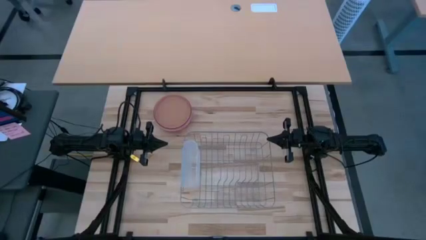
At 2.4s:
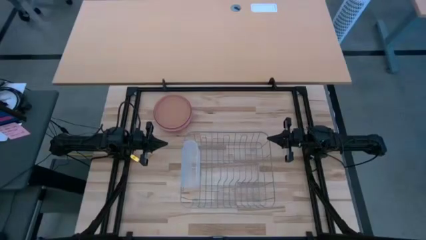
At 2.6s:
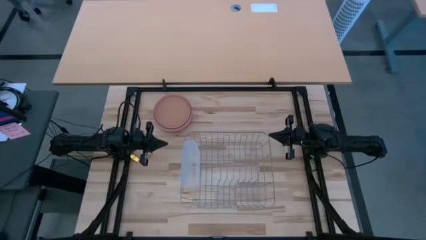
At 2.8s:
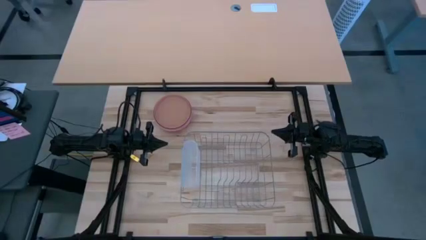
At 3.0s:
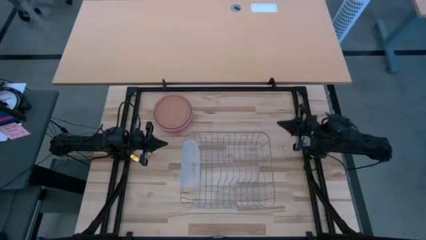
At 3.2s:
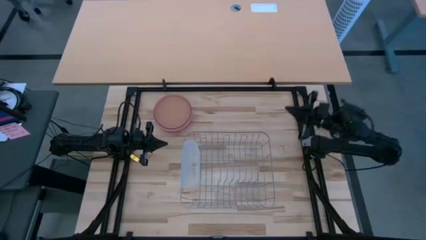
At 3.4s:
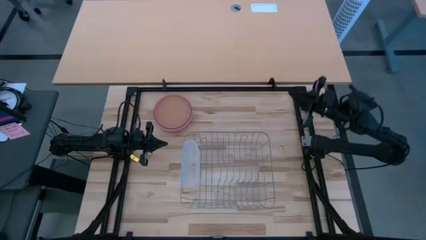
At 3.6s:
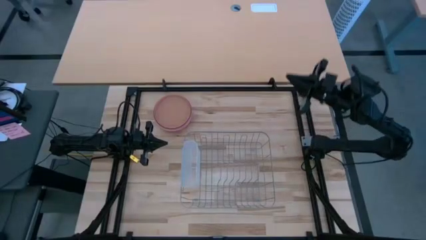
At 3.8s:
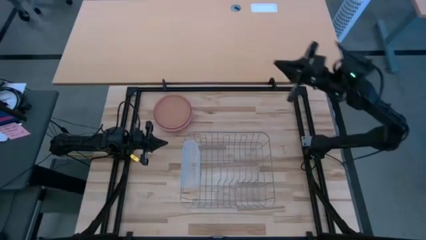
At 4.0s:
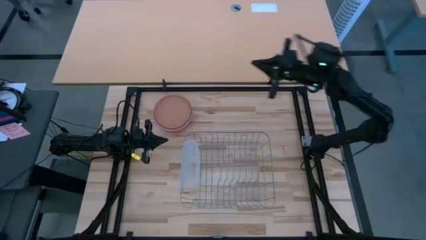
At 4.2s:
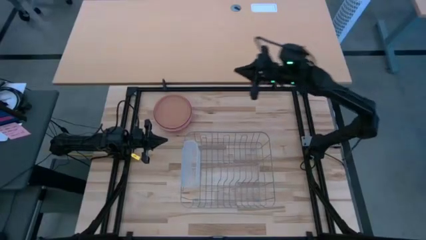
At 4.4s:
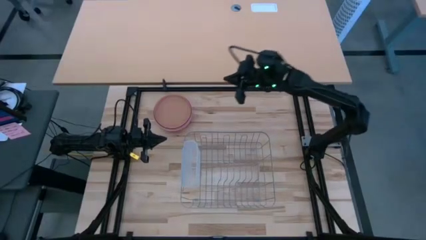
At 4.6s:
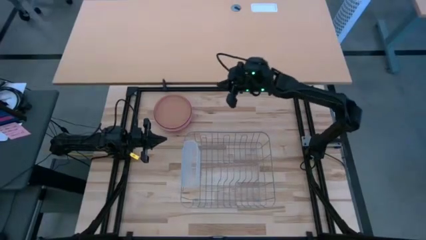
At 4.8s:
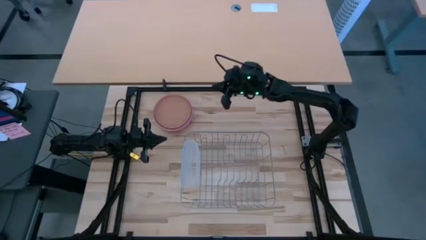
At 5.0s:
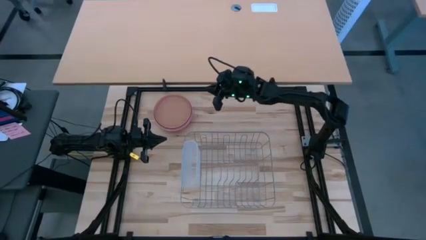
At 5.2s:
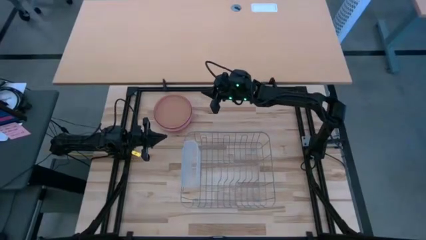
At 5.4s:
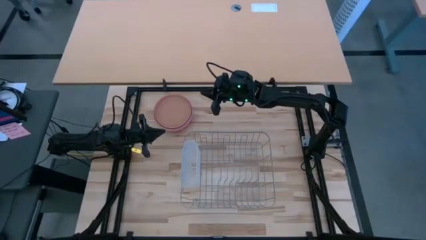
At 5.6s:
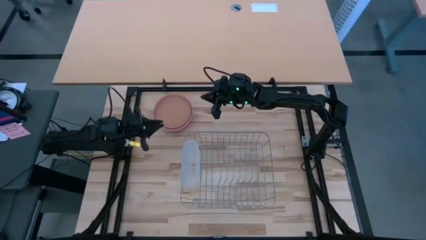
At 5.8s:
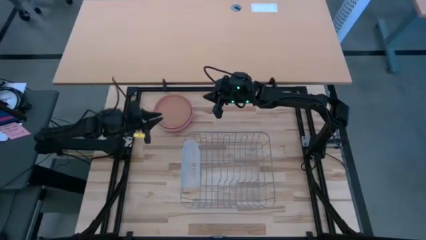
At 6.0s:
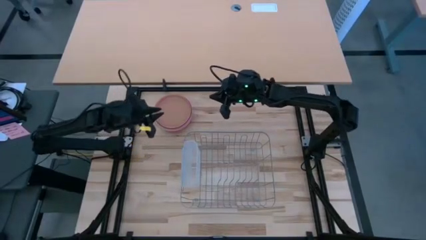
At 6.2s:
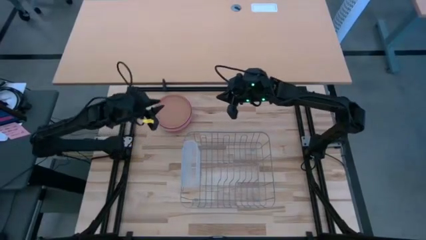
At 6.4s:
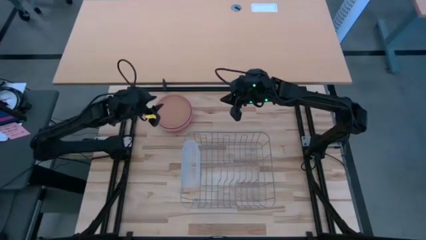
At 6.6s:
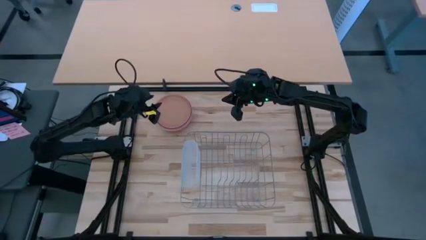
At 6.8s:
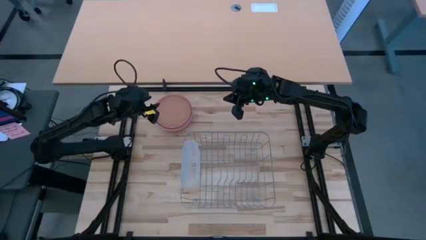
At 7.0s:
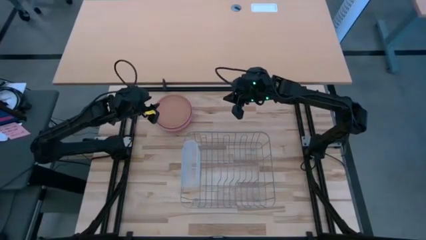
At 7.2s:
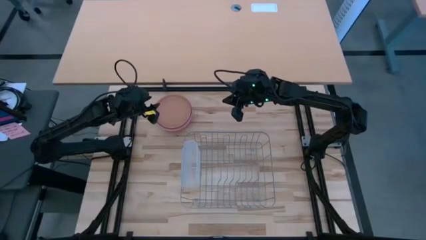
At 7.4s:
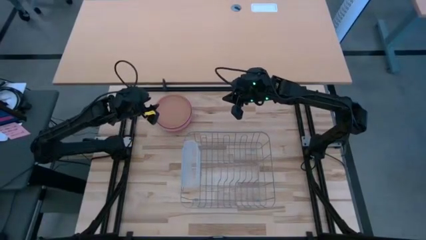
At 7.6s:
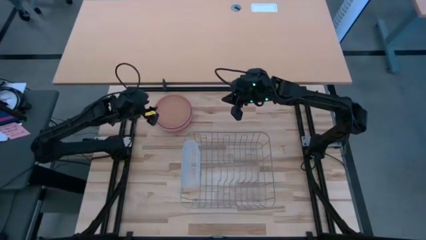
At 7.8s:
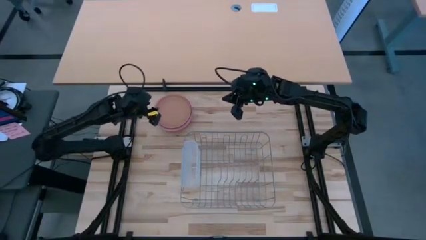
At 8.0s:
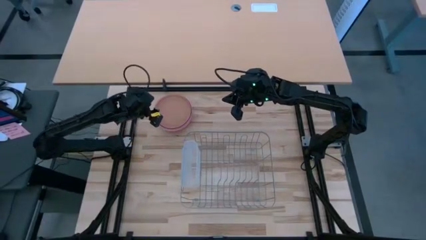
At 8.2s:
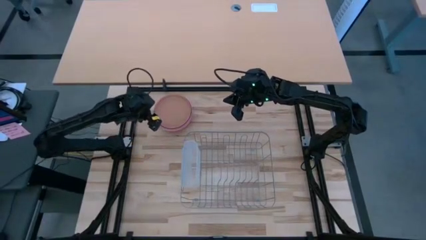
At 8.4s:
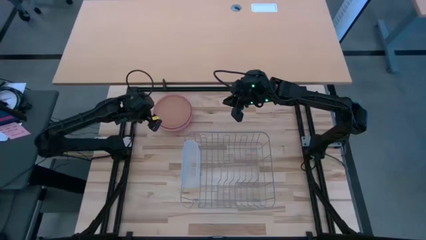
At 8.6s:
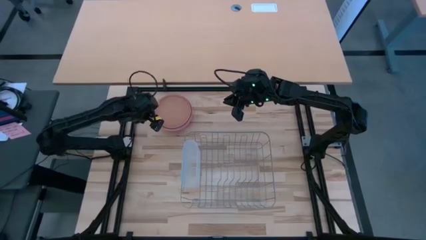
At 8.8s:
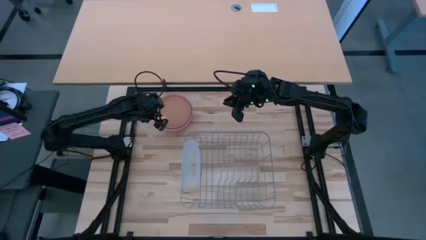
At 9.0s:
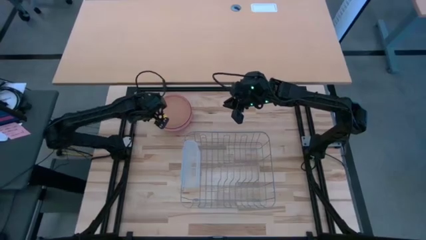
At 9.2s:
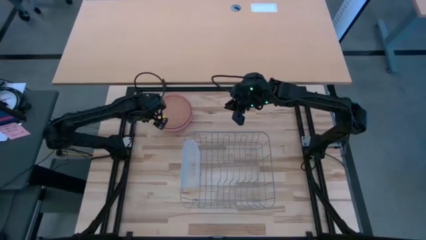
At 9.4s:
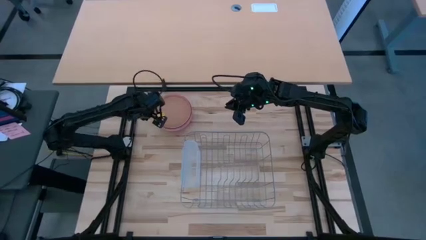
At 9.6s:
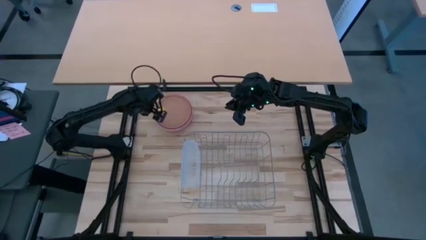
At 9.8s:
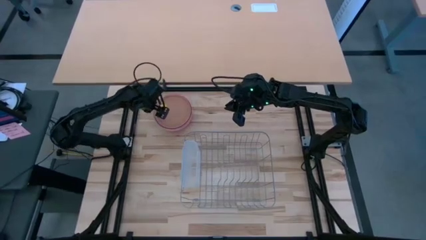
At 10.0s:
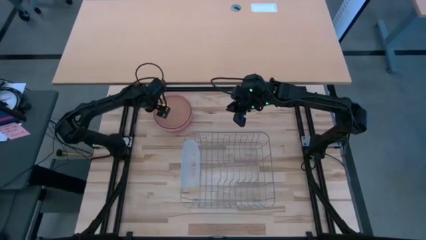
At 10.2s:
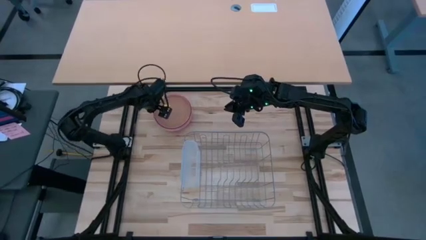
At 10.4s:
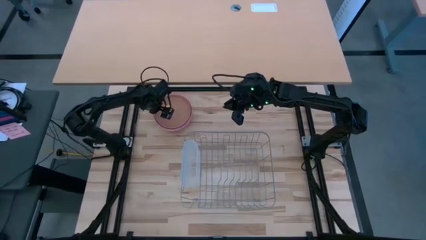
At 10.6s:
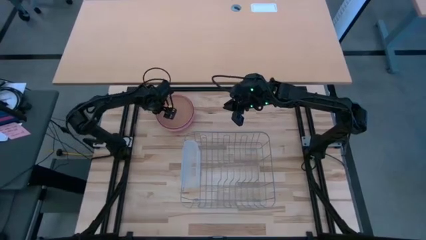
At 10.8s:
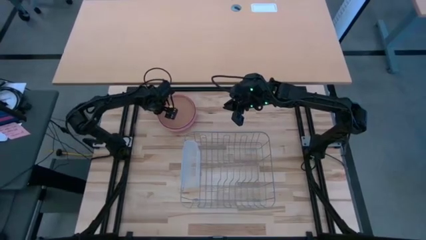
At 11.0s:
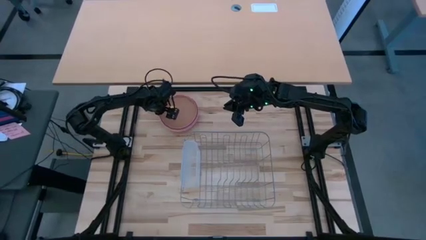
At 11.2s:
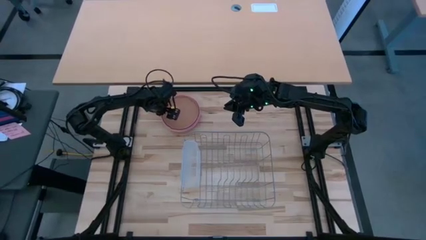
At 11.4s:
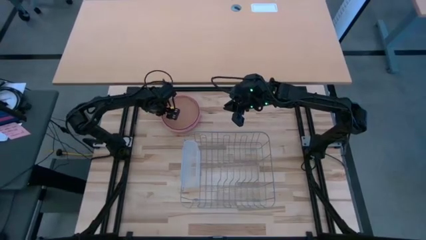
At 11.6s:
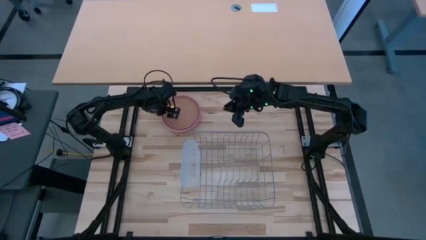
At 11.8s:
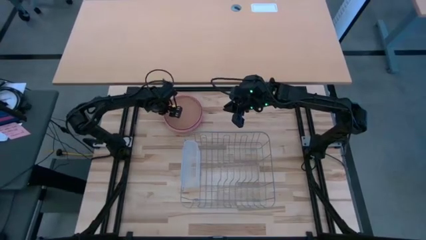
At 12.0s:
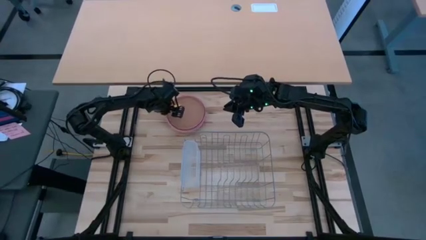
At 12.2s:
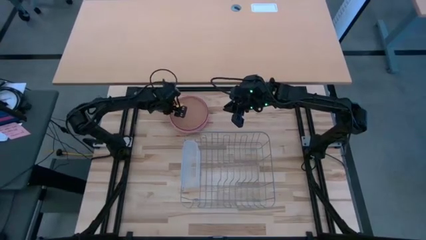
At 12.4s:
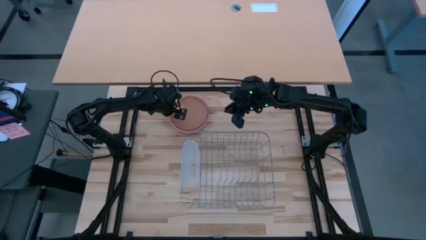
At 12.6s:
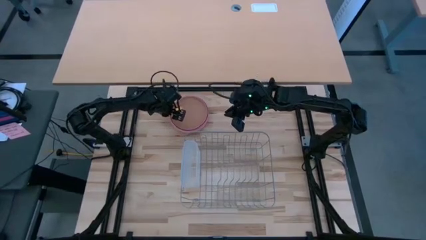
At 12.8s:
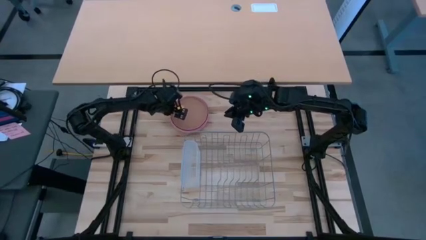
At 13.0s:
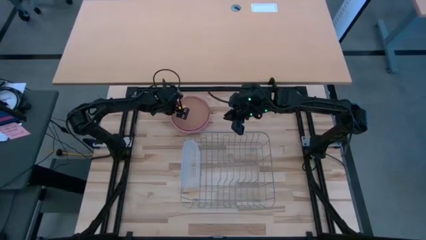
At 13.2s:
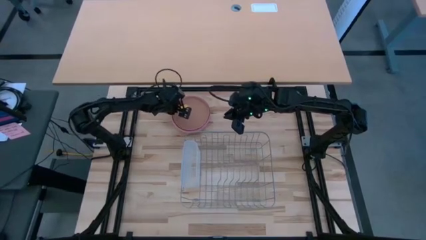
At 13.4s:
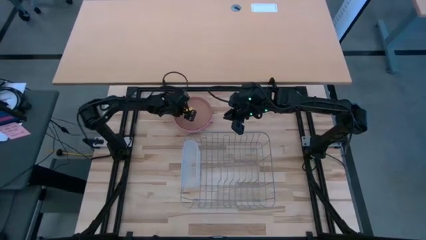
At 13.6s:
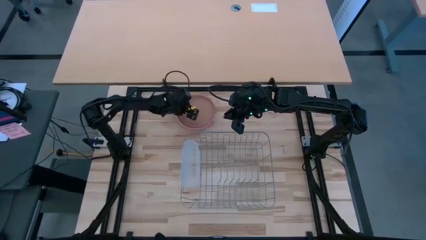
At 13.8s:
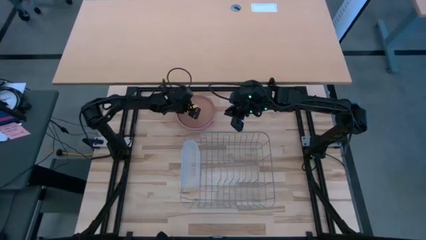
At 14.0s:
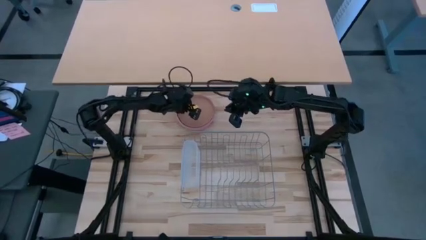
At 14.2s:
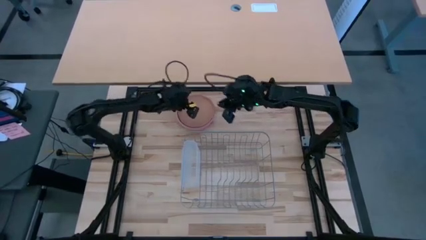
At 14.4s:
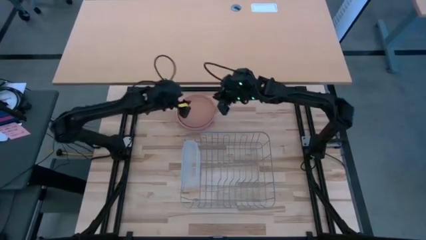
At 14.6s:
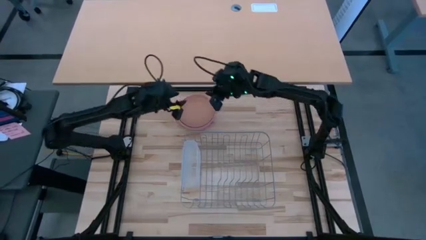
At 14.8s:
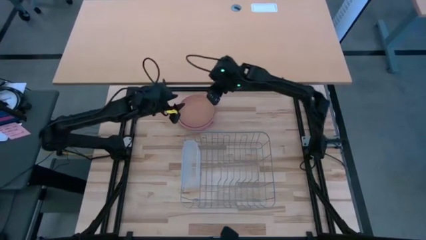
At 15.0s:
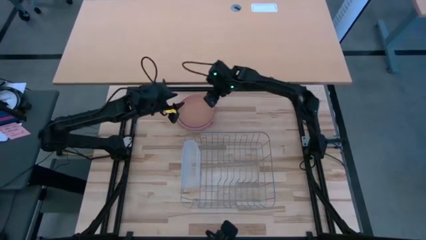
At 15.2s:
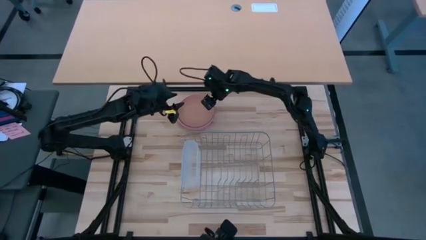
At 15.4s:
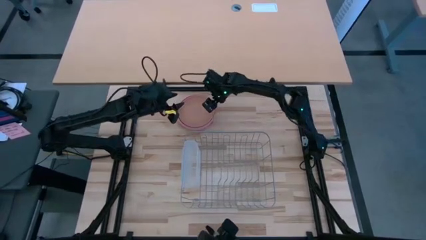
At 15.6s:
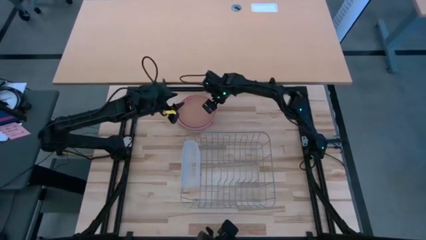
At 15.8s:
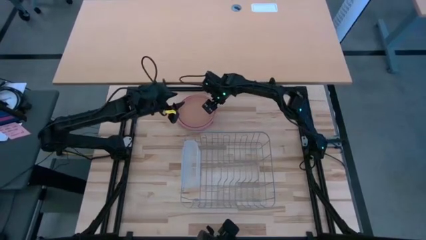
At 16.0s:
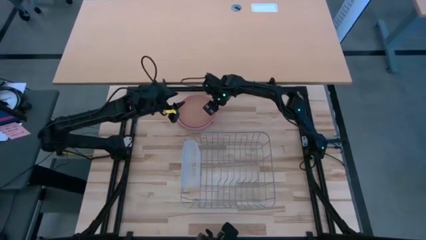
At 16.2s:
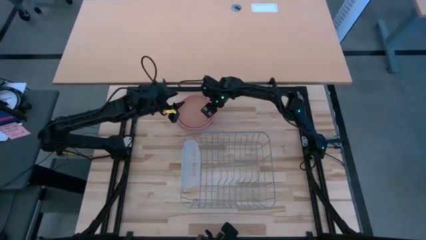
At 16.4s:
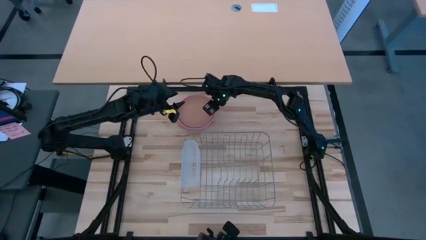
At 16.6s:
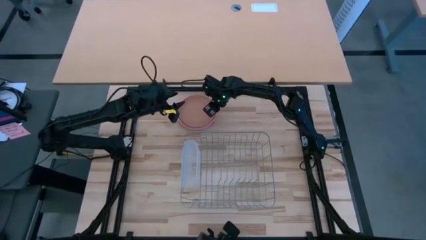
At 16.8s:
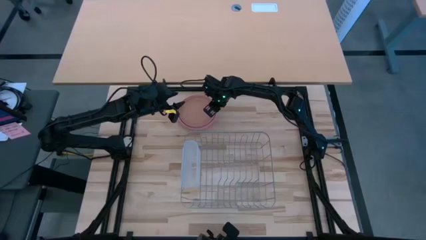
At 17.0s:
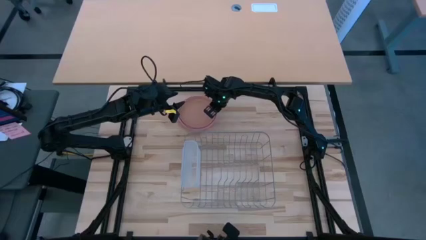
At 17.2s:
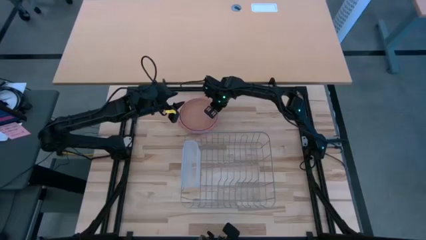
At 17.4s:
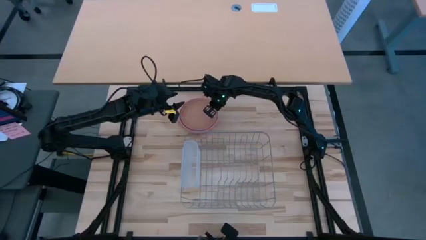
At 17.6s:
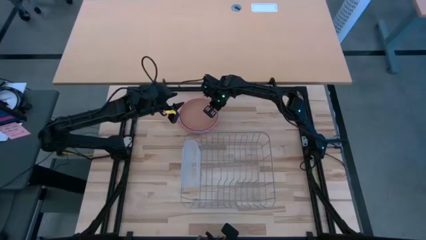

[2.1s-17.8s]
Task: Sort dishes
Put the light brown plate in the dish rack
